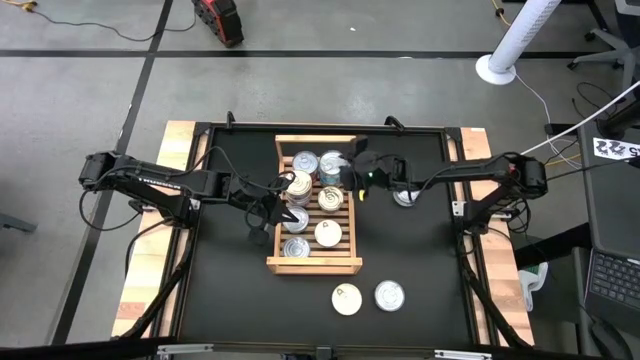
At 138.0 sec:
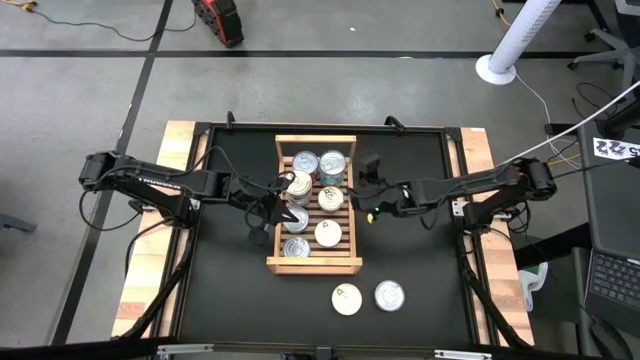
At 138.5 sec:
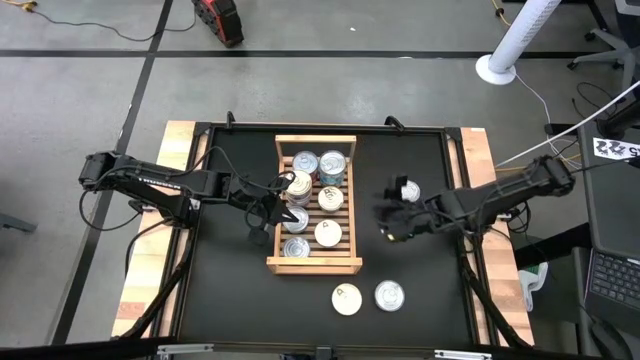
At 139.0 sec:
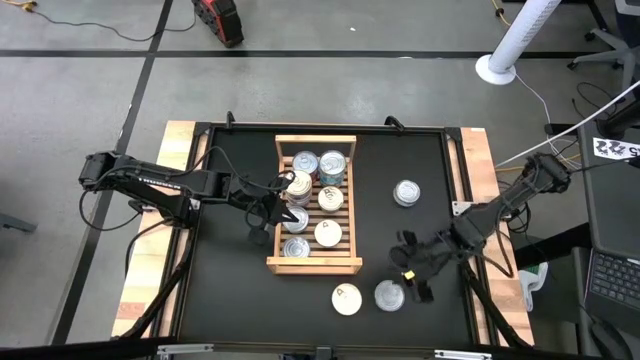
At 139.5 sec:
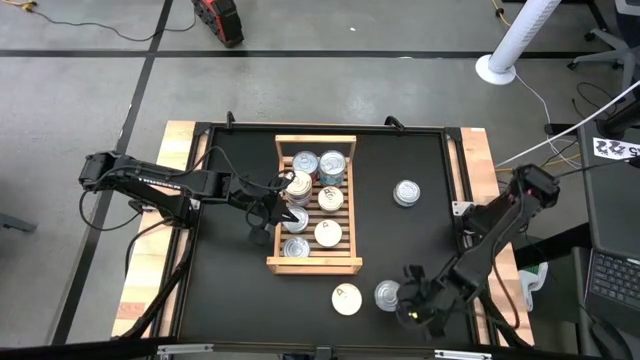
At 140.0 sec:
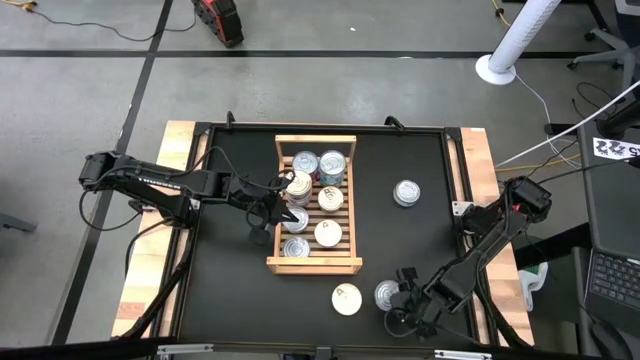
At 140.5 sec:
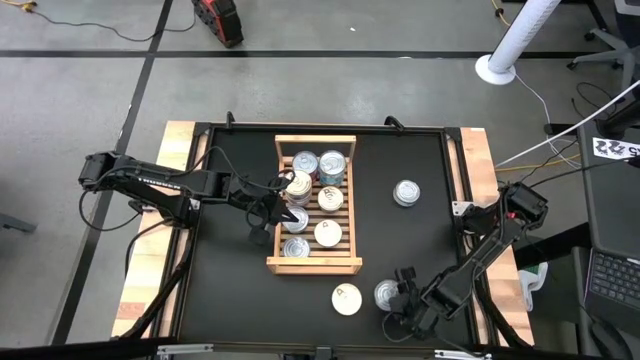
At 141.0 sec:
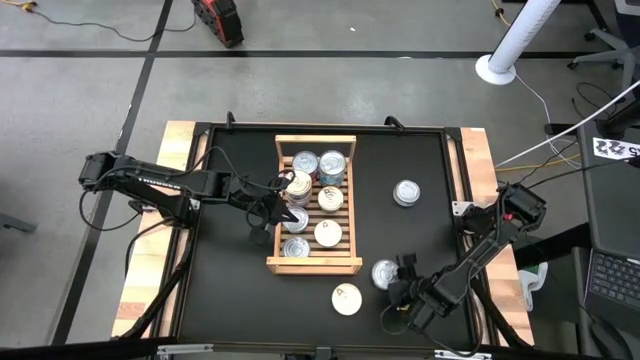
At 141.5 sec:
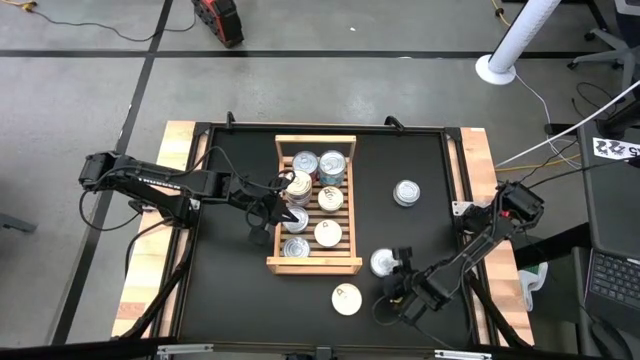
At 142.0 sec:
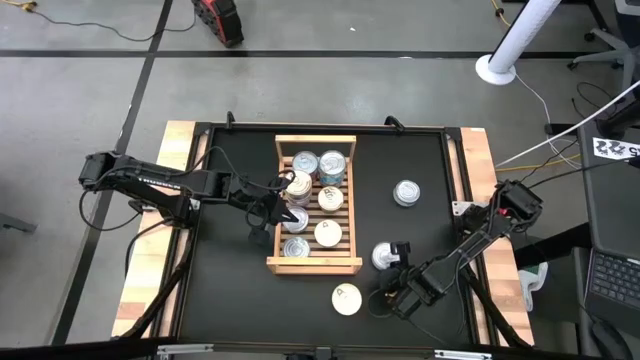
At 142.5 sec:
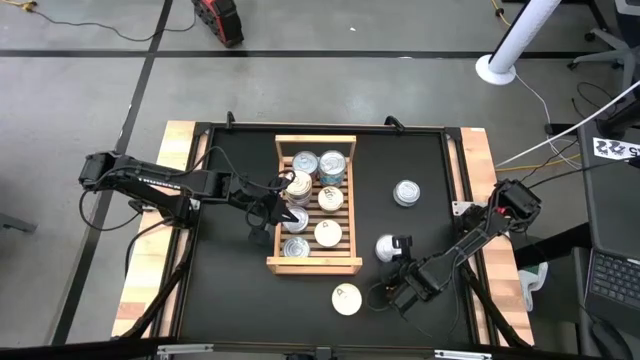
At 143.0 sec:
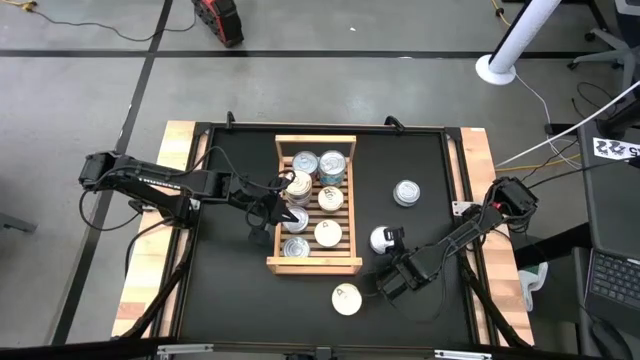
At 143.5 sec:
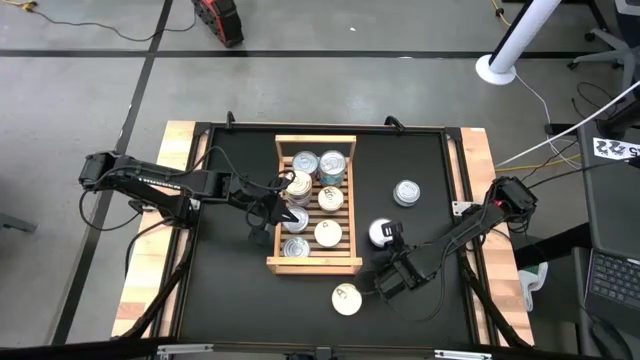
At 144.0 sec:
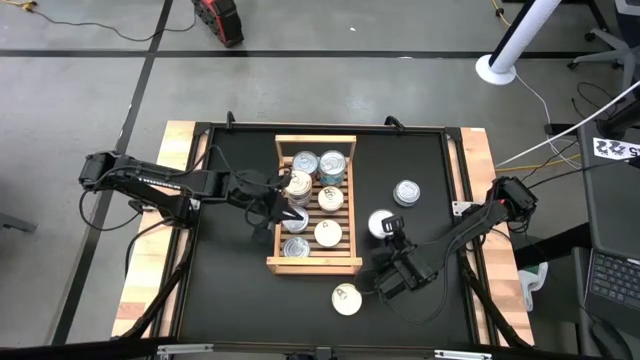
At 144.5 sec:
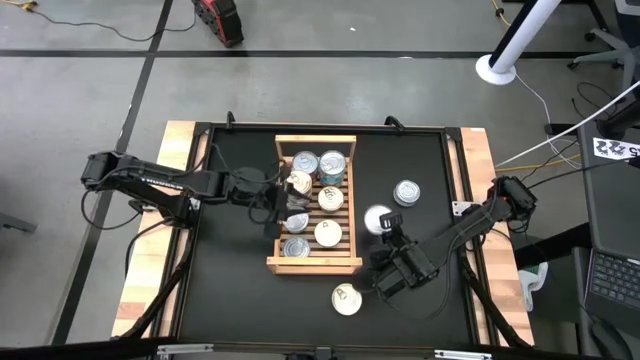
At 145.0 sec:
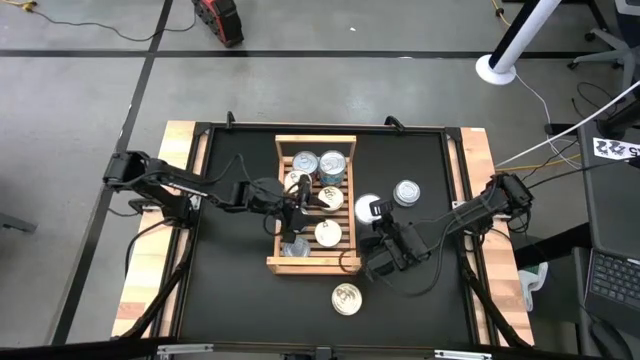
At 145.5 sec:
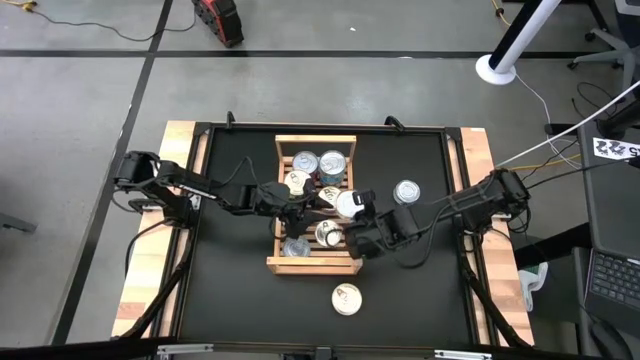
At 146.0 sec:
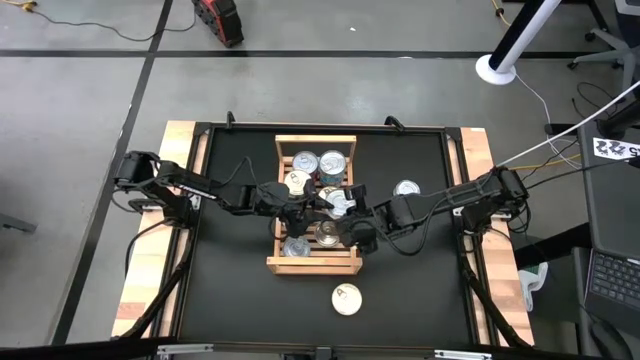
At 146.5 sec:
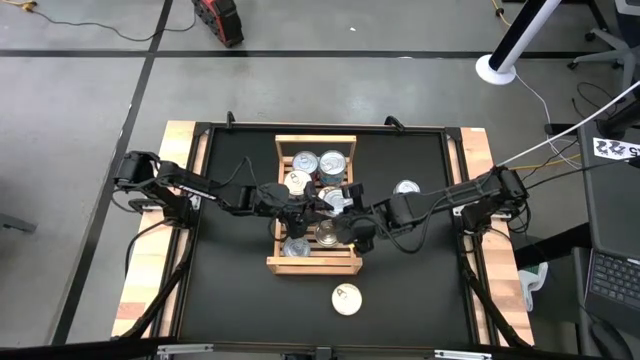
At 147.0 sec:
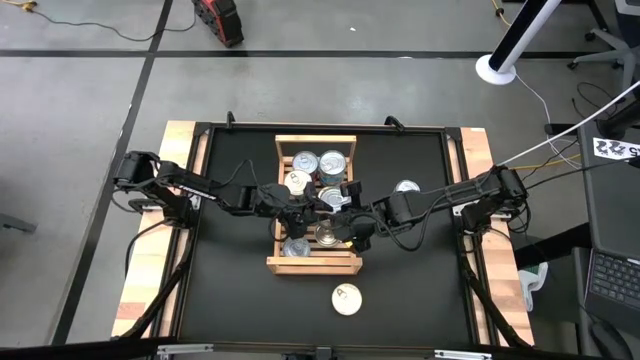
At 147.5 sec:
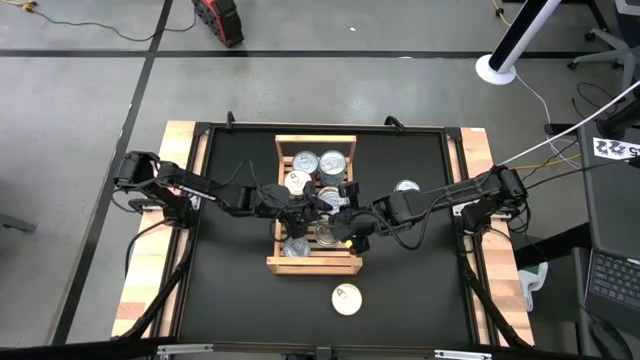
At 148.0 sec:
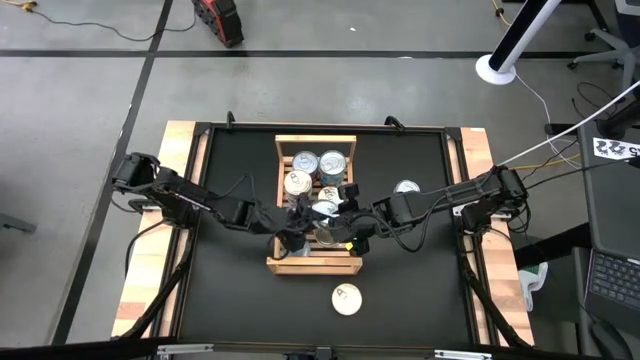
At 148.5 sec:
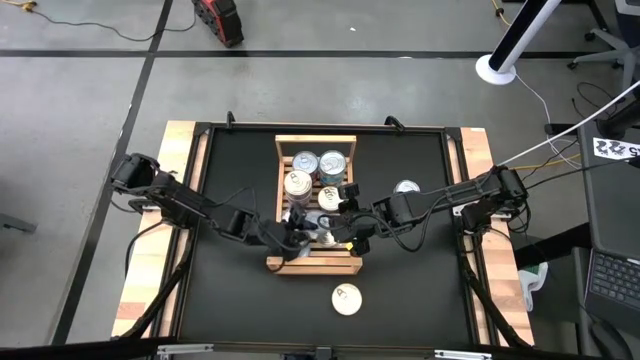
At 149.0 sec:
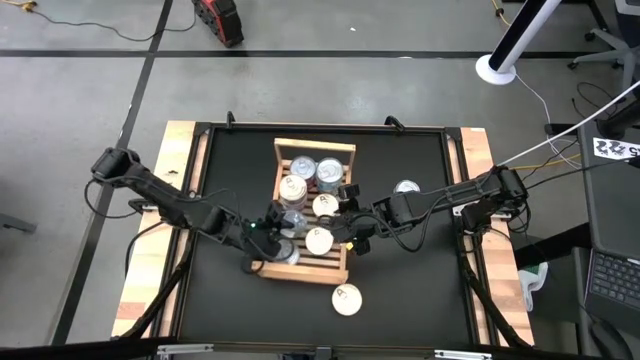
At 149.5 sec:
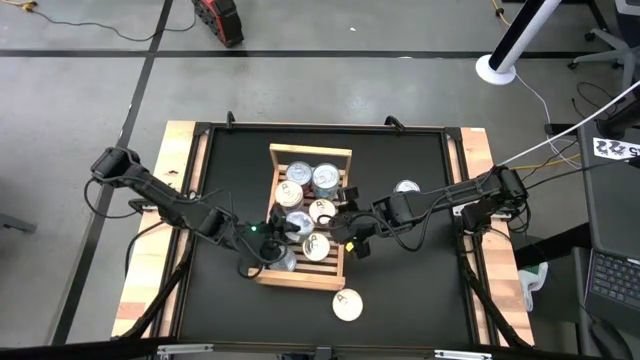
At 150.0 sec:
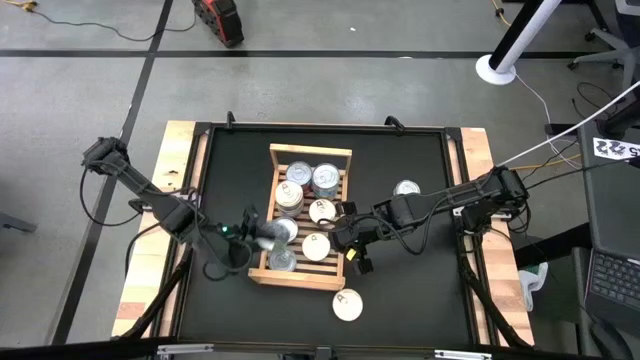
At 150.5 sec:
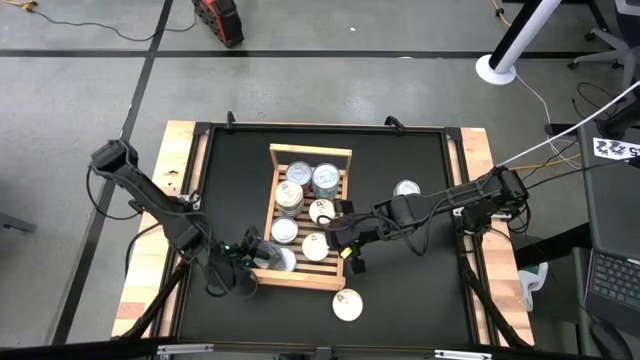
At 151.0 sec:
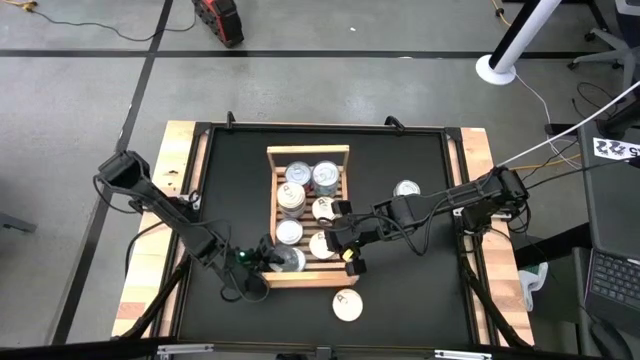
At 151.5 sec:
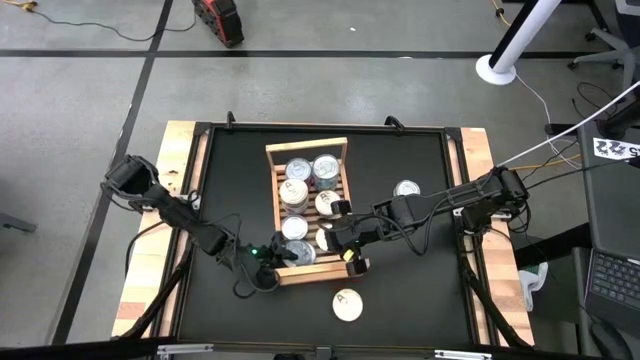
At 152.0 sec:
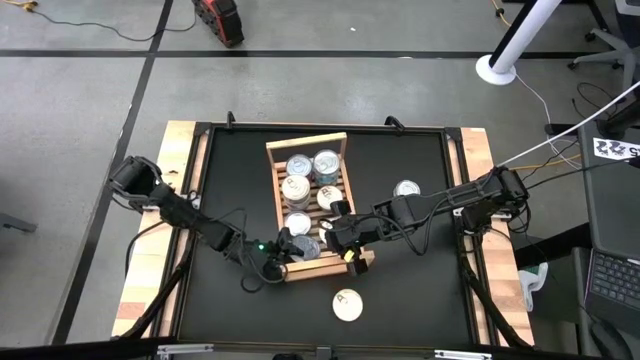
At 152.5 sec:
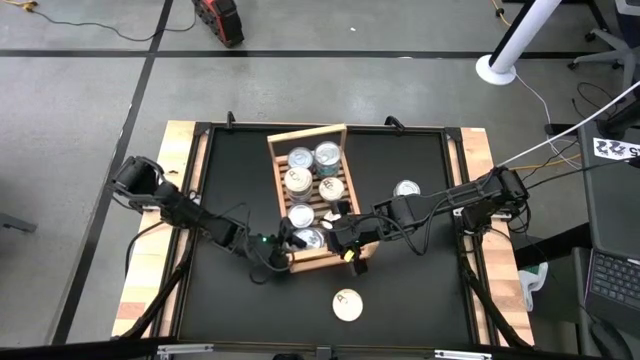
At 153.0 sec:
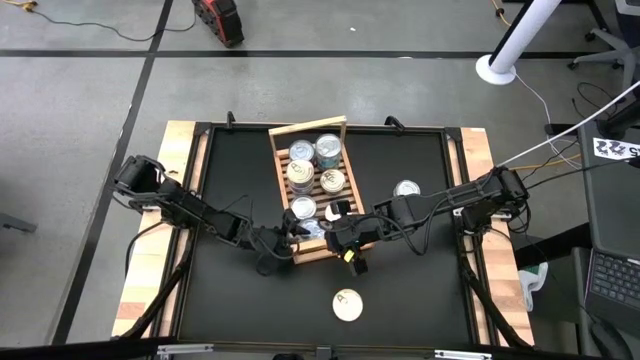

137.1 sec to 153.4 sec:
Task: Stack canned seafood by type on shelf
Stack the green tuna can on top of the other green tuna can on the shelf

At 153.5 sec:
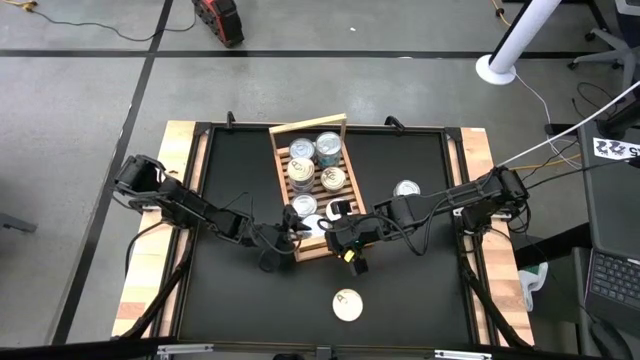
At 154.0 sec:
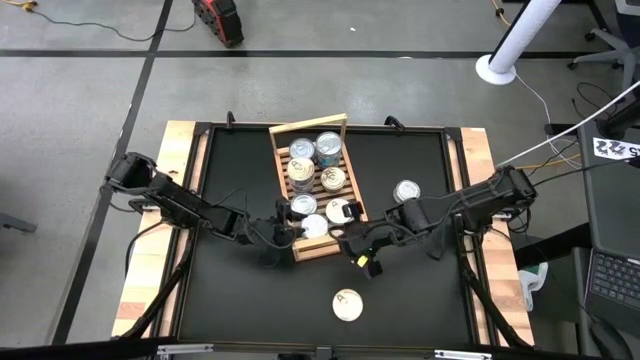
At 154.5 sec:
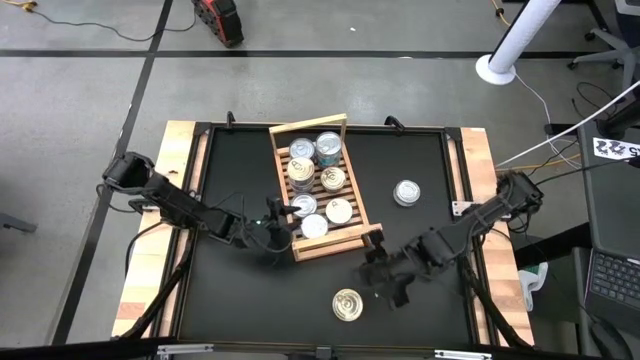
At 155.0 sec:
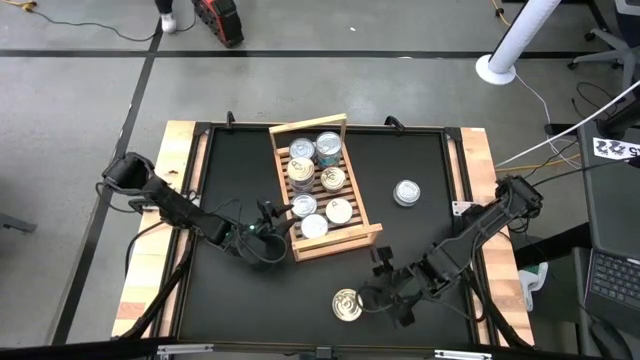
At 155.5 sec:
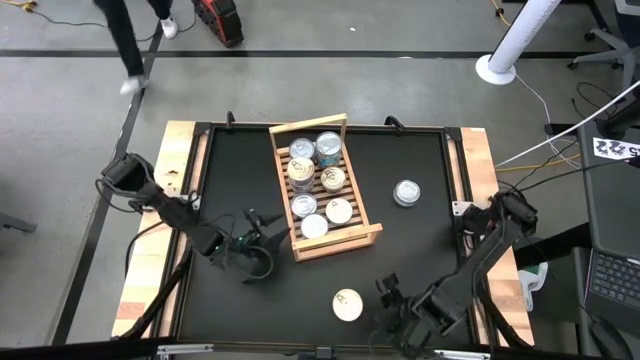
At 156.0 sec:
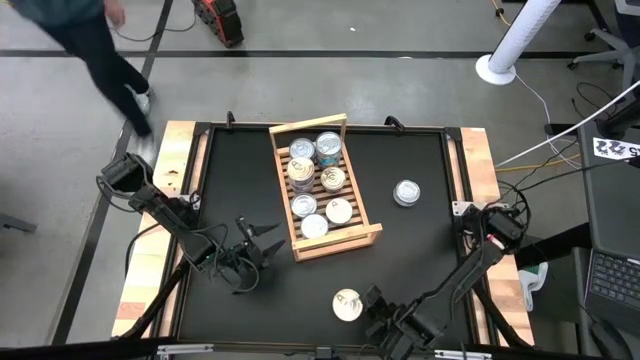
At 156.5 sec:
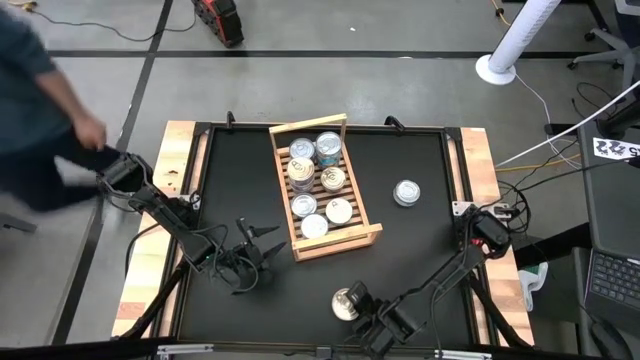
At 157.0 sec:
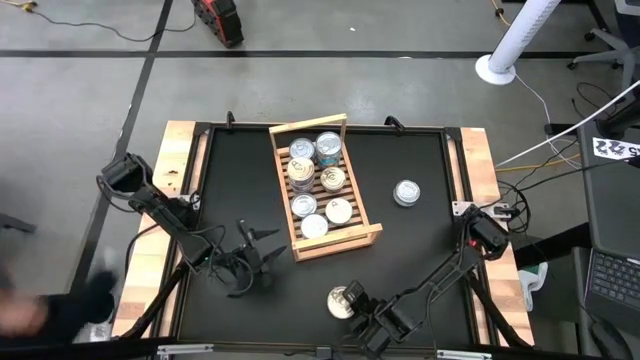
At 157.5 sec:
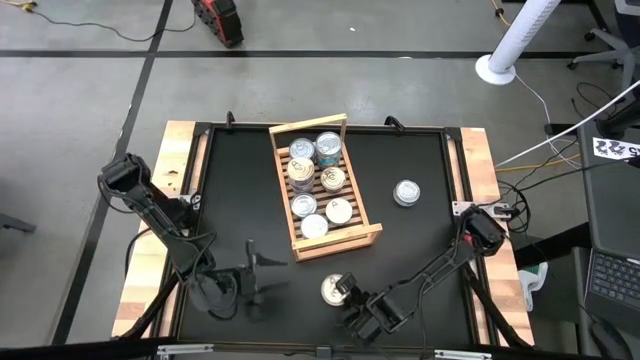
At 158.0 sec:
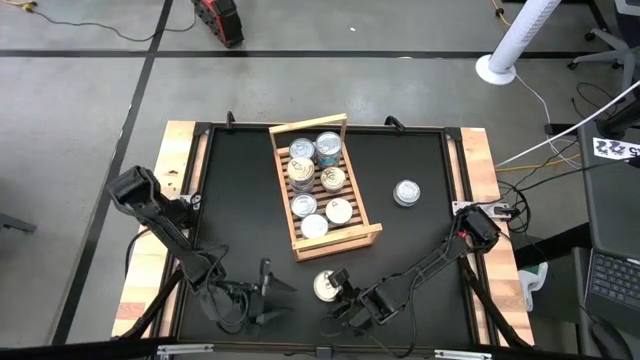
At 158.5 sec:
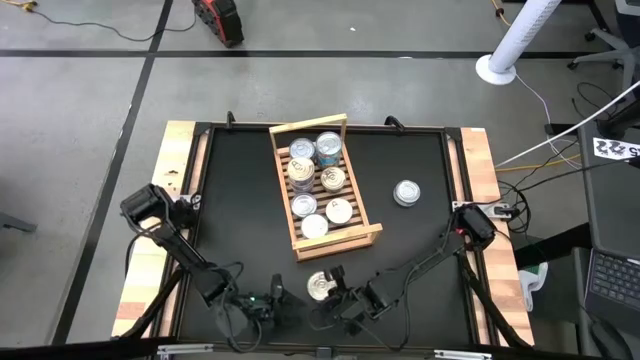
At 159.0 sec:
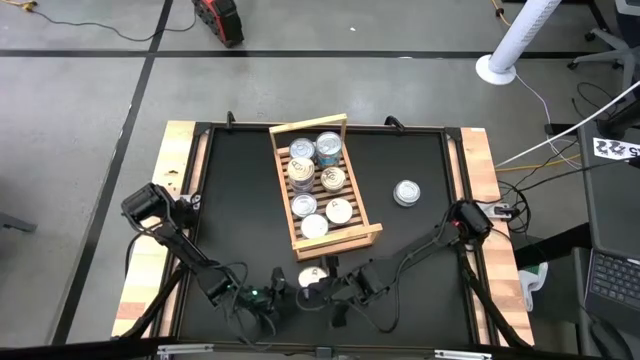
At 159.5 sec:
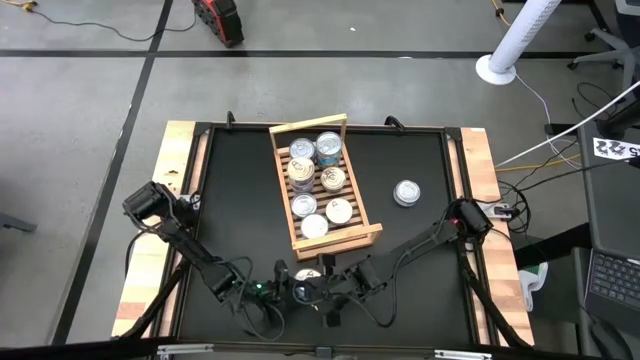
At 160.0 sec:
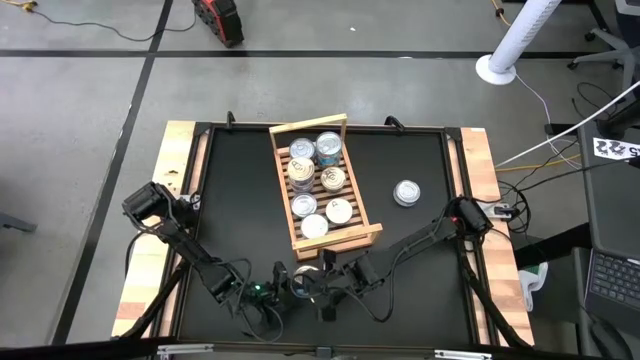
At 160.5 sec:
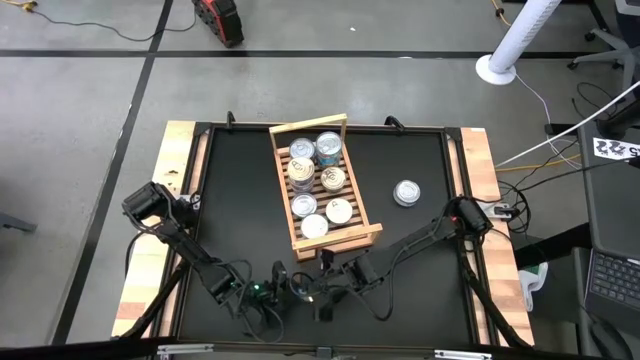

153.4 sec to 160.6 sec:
Stack the blue-pink tuna can on top of the other blue-pink tuna can on the shelf
